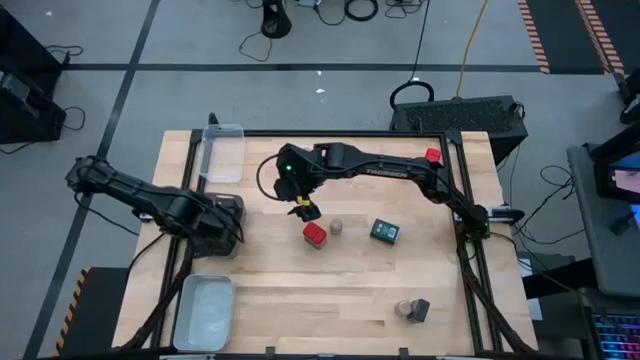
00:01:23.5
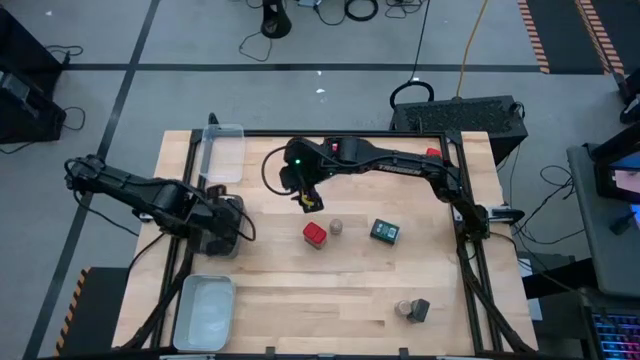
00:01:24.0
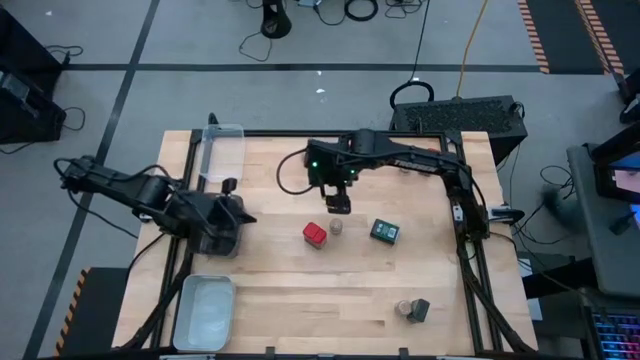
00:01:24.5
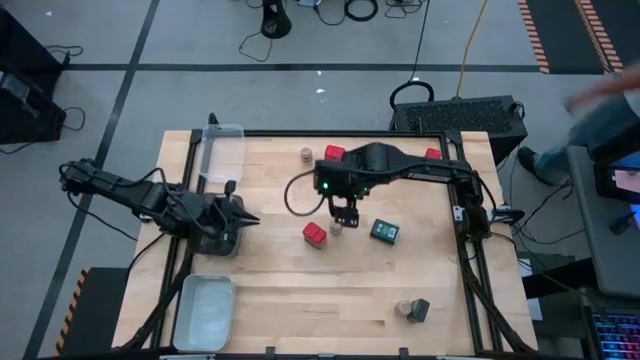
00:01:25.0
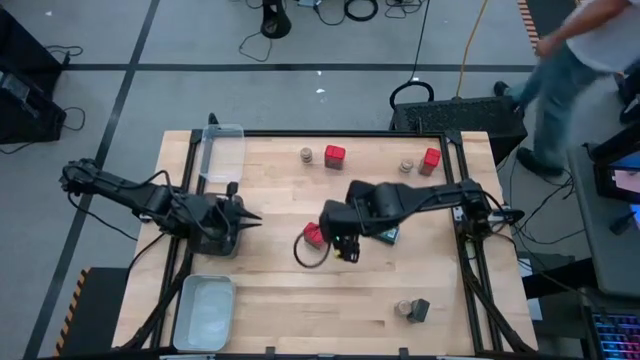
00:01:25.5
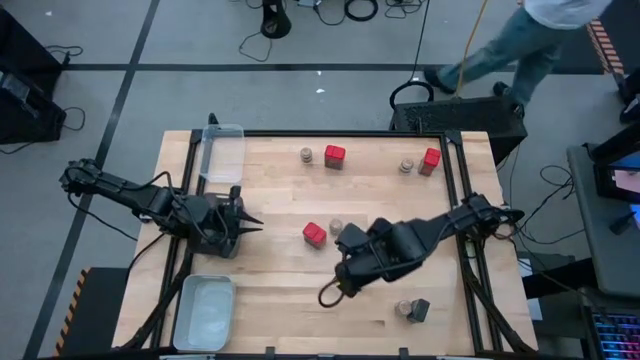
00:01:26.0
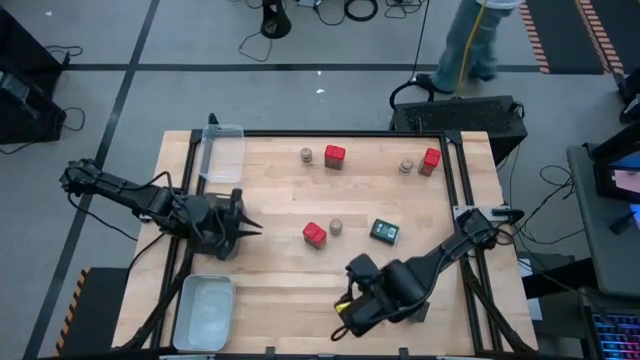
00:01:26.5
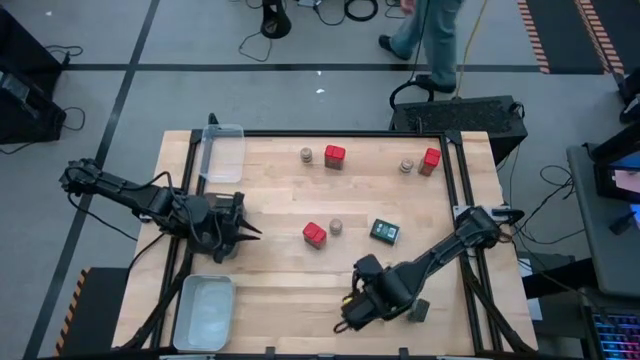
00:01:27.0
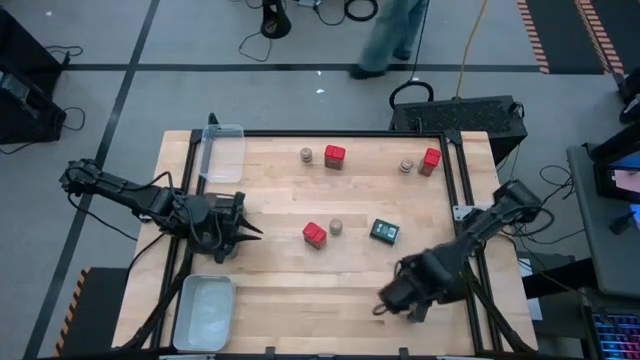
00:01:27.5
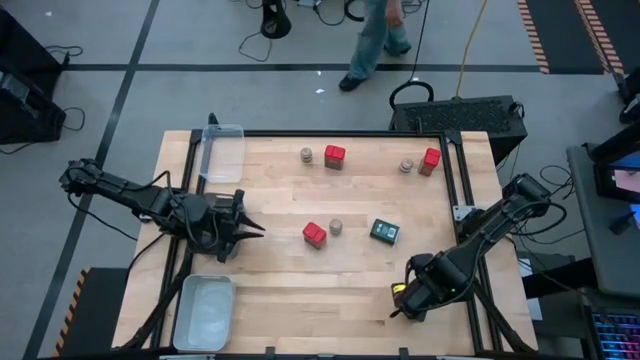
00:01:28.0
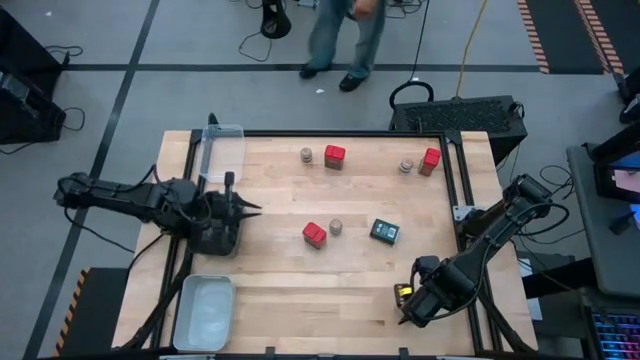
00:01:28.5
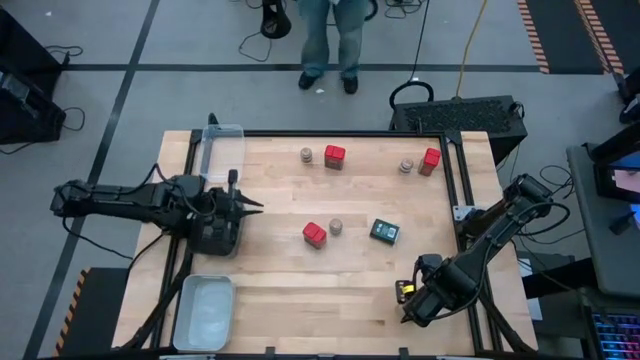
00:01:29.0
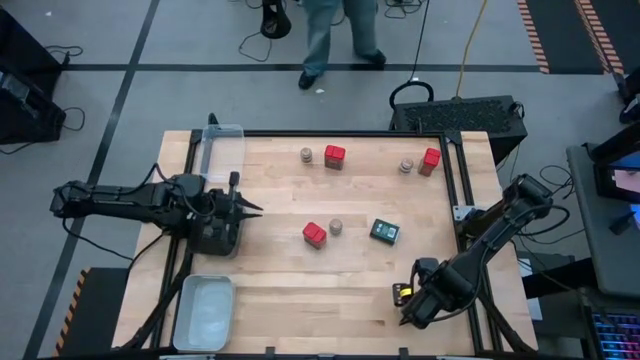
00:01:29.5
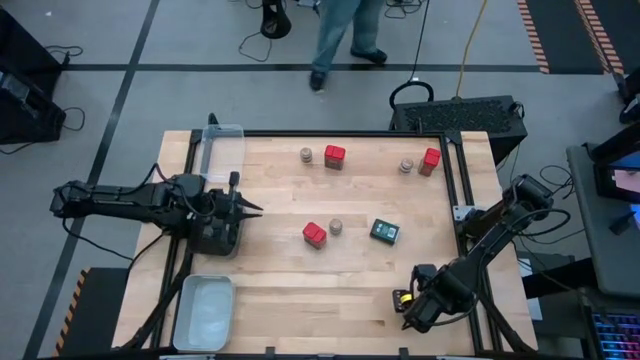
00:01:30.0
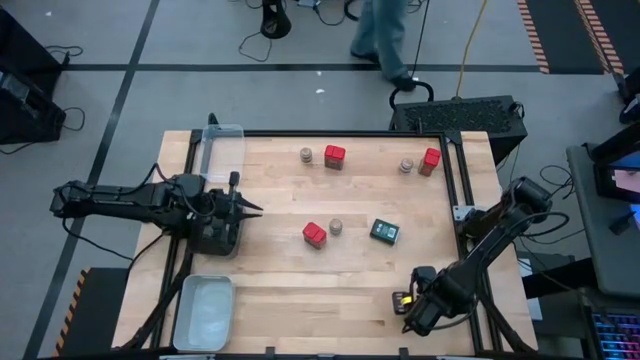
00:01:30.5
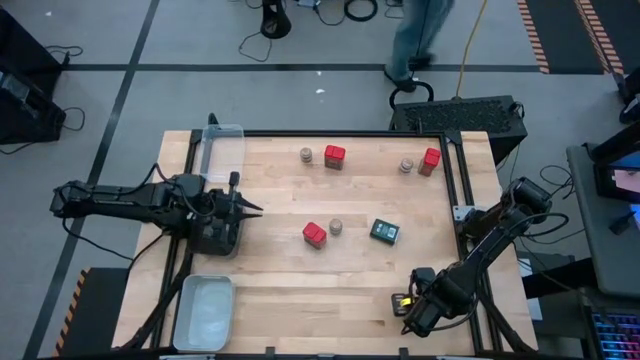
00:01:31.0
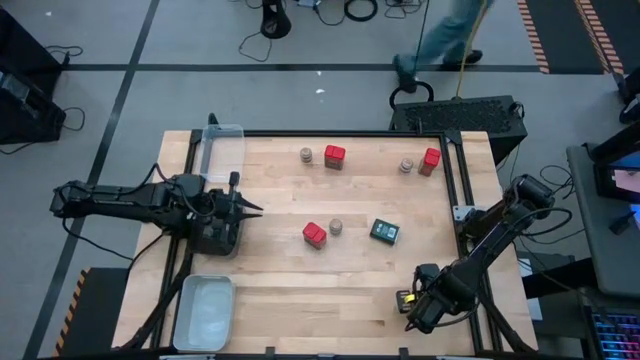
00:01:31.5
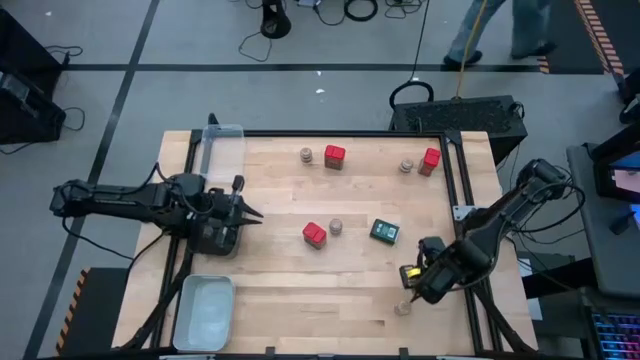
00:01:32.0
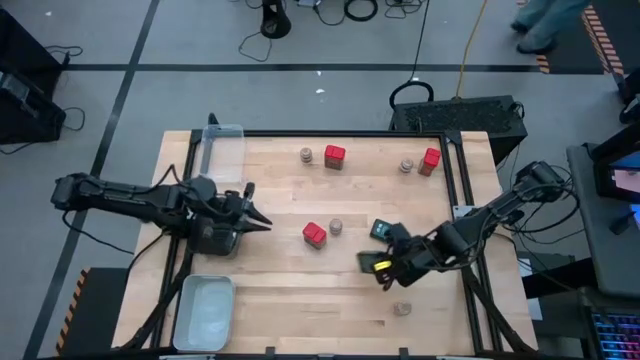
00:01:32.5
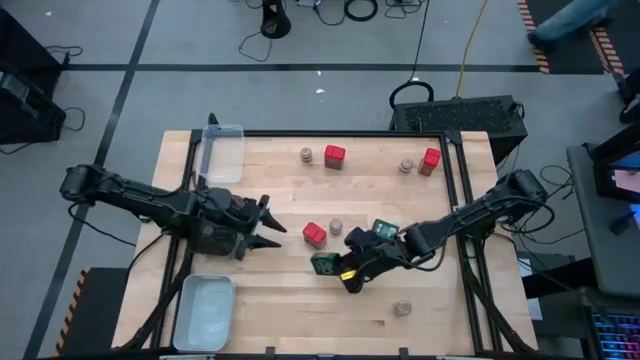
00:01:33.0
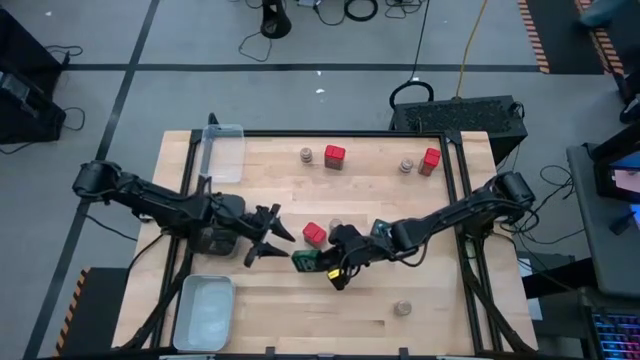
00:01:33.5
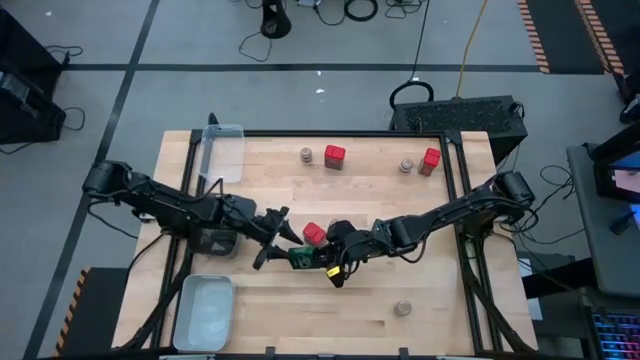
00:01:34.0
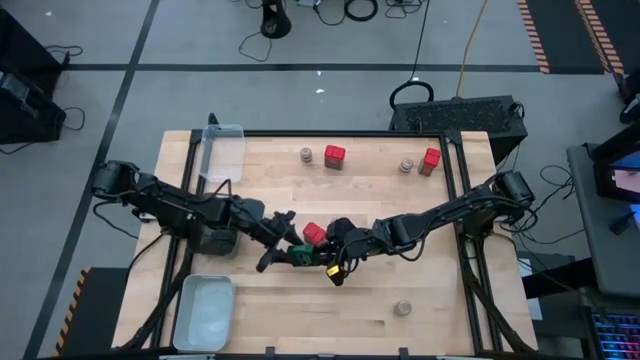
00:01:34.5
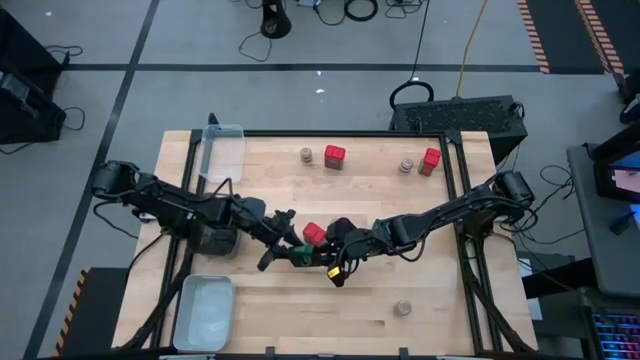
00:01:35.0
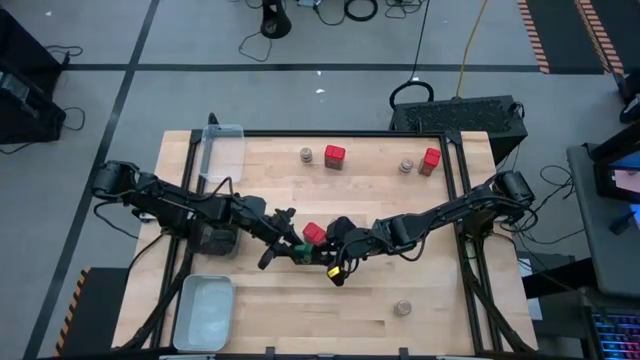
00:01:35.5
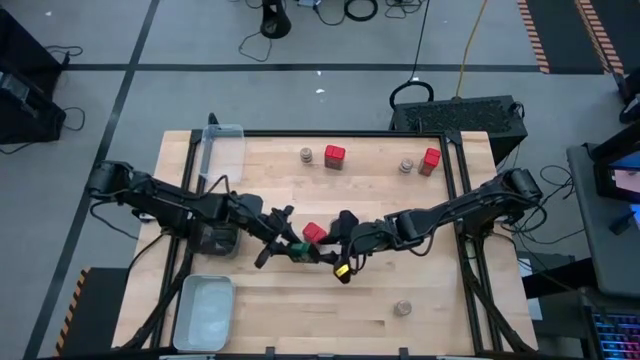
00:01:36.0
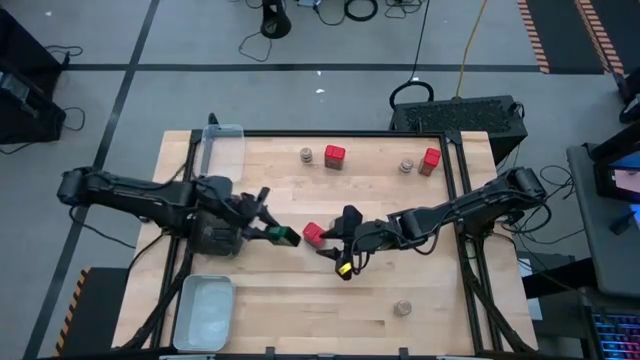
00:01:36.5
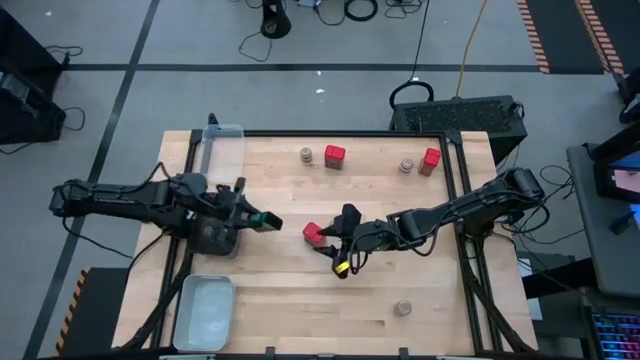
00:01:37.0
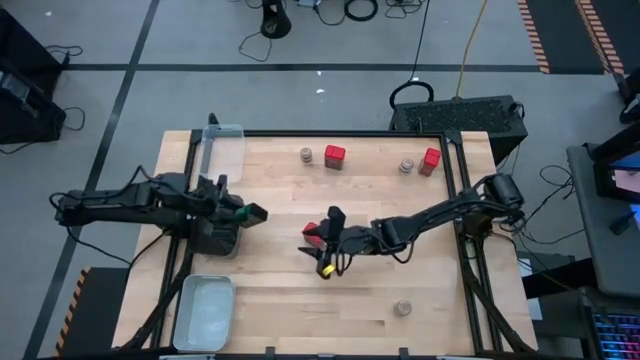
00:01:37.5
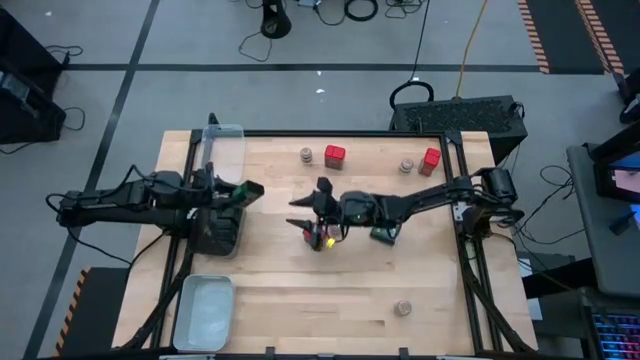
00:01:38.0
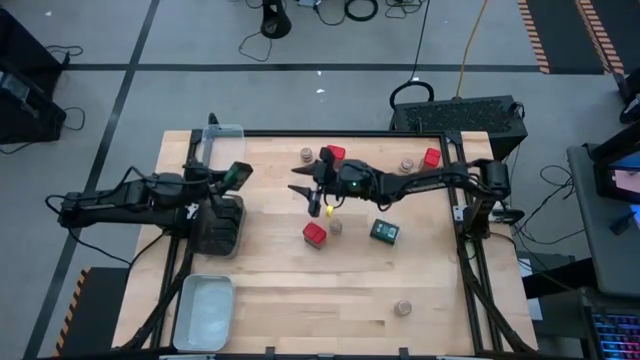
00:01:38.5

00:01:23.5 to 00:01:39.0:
Task: Sort spices by type
Put the black seasoning can into the black bin

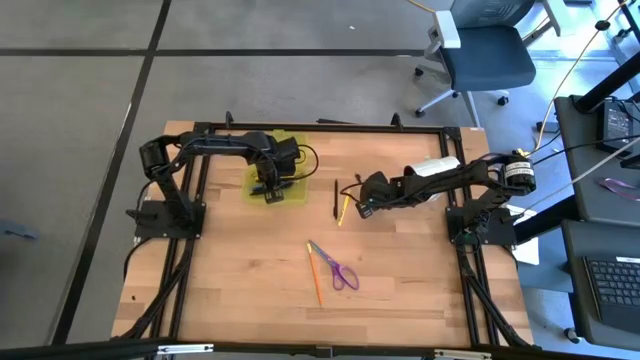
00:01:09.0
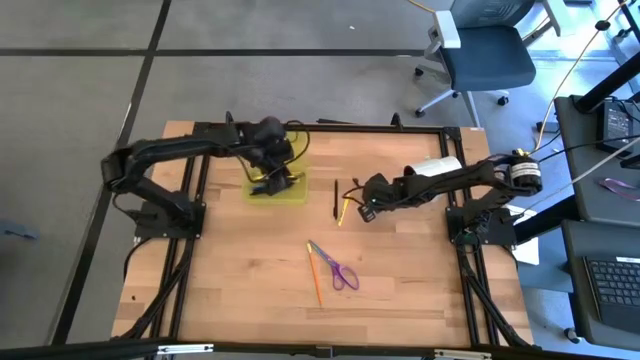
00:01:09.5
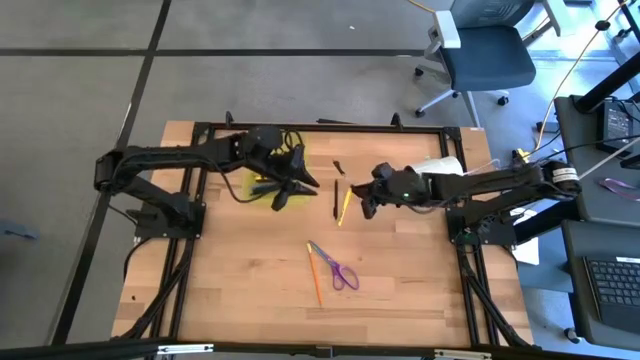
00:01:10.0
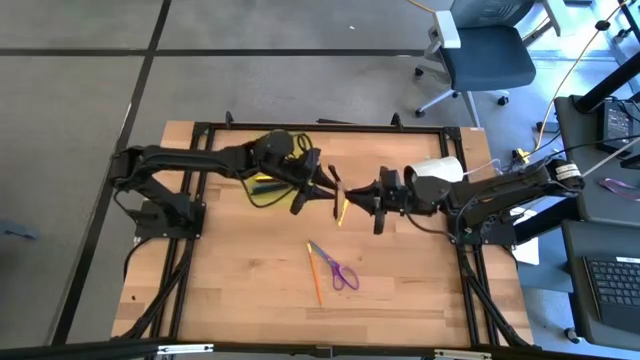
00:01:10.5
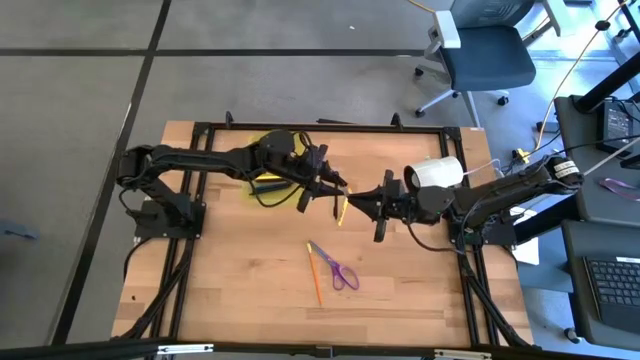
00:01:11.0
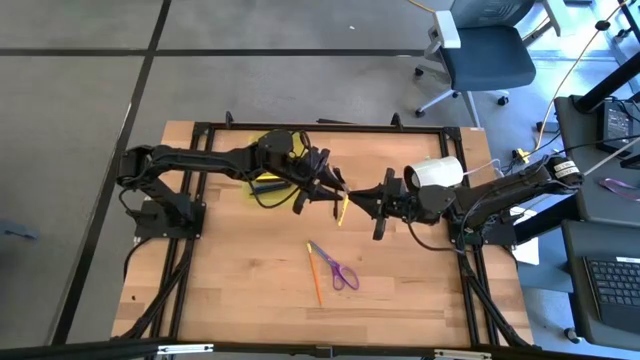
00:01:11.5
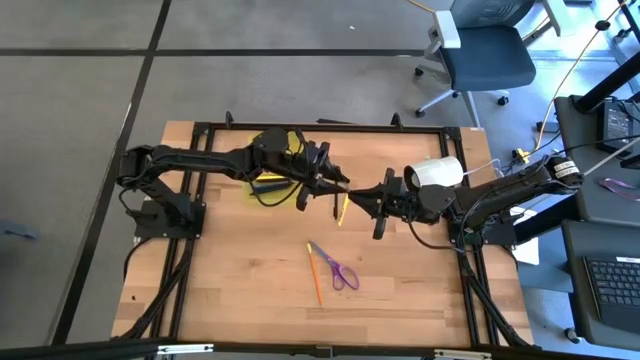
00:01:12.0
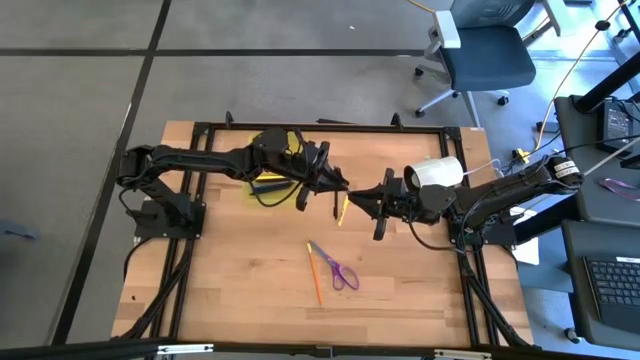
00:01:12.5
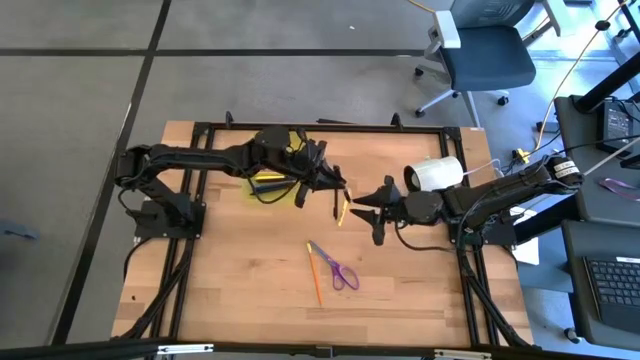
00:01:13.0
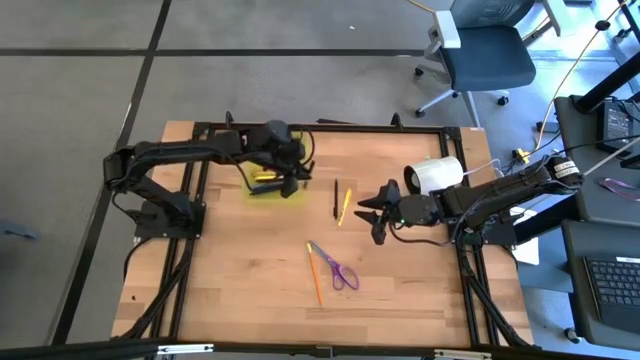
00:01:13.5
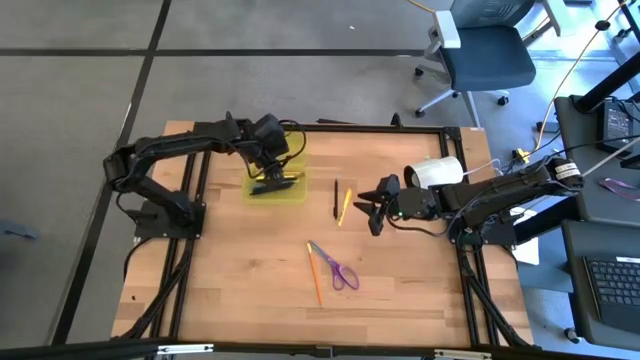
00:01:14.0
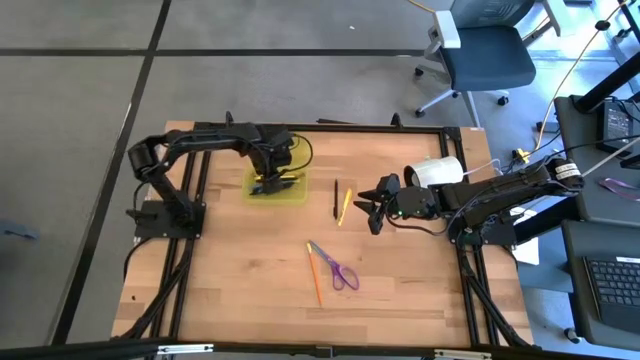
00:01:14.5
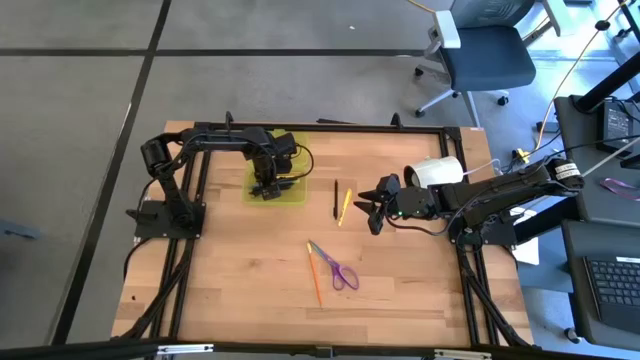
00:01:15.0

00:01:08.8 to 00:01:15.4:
Task: Pick & place school supplies into a supply box
Put the black pen into the yellow supply box
